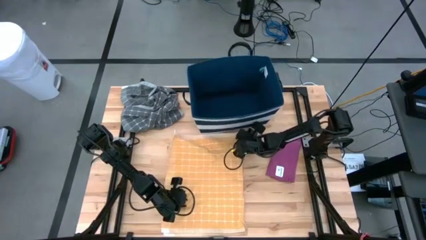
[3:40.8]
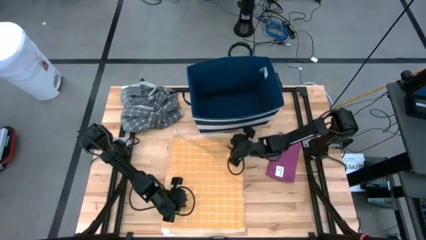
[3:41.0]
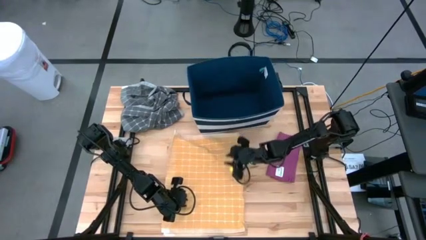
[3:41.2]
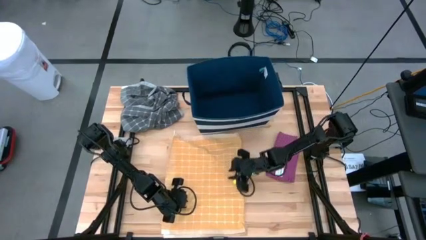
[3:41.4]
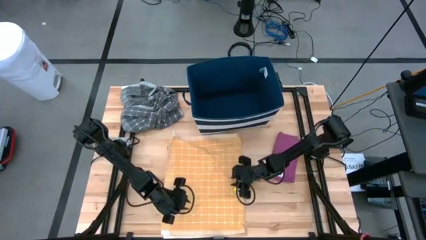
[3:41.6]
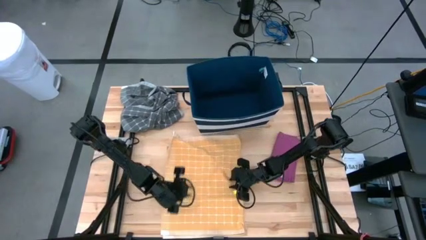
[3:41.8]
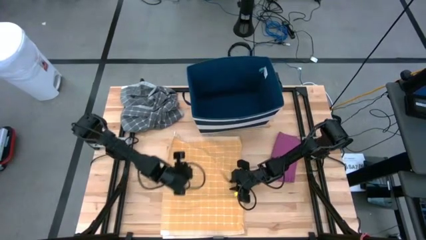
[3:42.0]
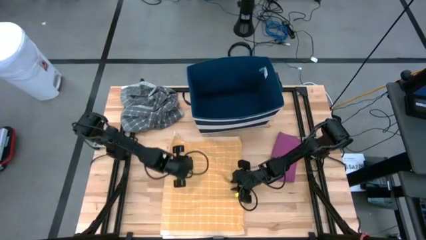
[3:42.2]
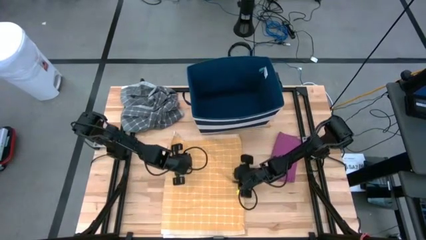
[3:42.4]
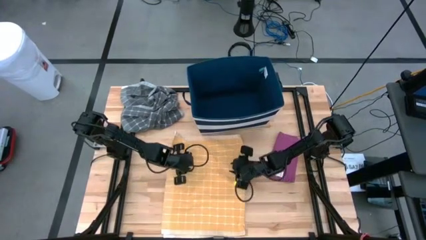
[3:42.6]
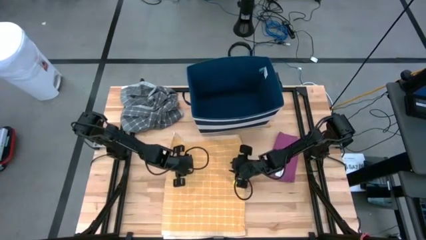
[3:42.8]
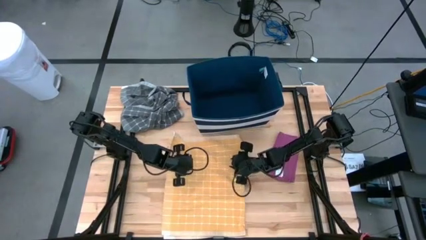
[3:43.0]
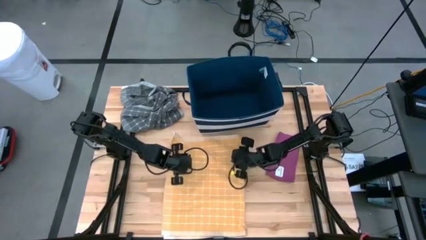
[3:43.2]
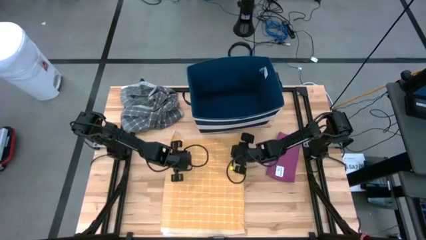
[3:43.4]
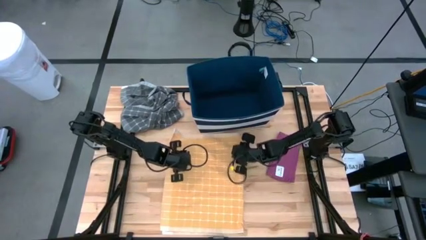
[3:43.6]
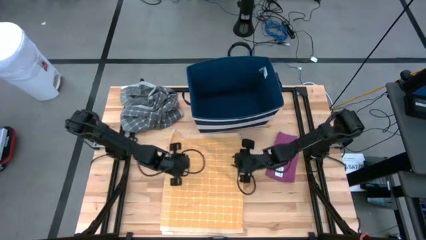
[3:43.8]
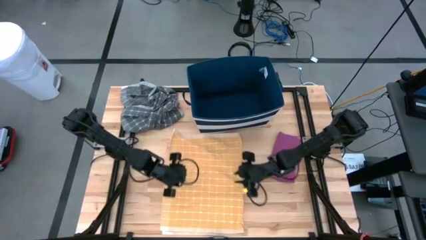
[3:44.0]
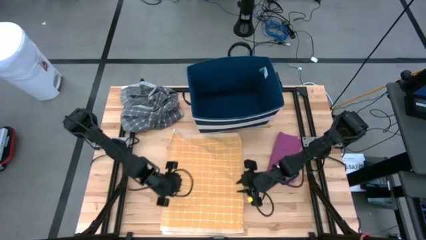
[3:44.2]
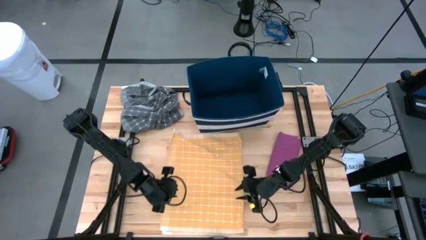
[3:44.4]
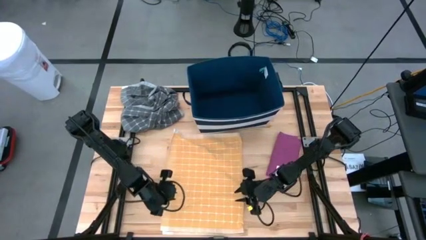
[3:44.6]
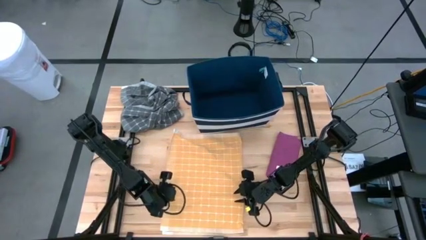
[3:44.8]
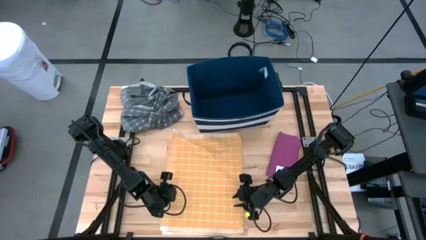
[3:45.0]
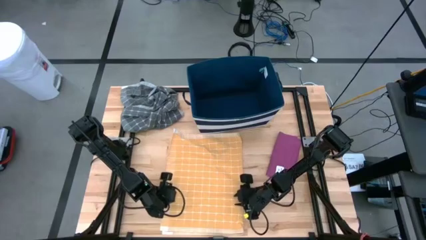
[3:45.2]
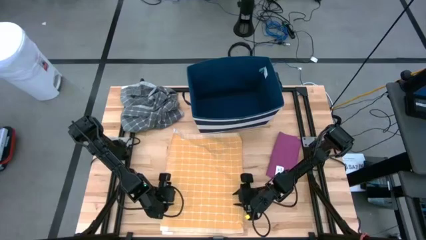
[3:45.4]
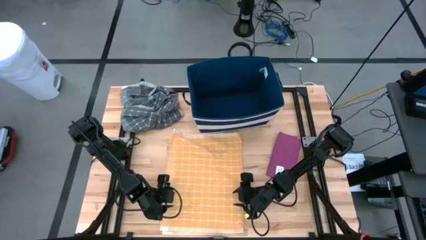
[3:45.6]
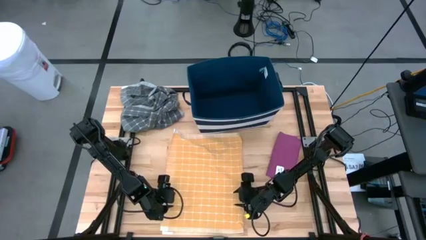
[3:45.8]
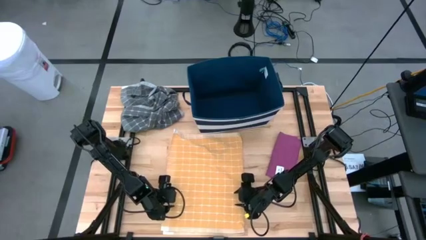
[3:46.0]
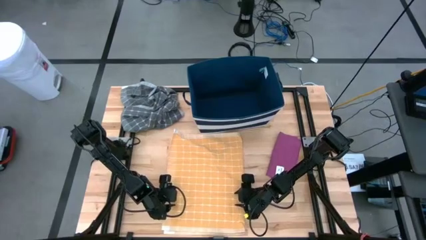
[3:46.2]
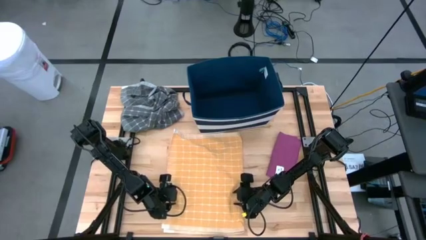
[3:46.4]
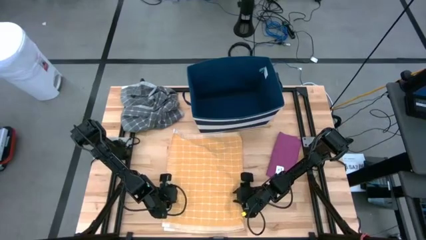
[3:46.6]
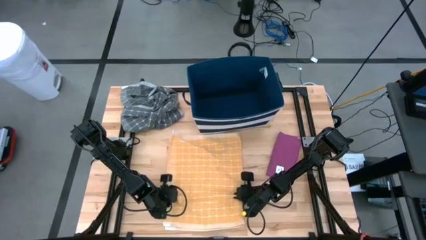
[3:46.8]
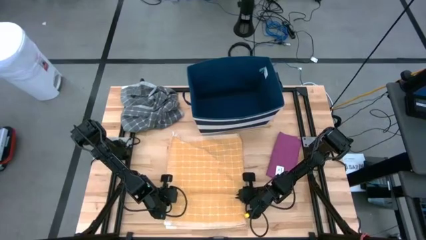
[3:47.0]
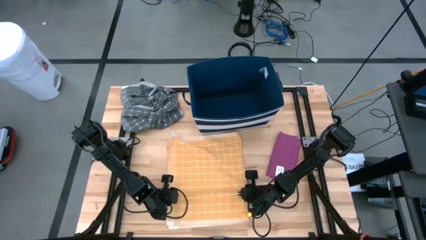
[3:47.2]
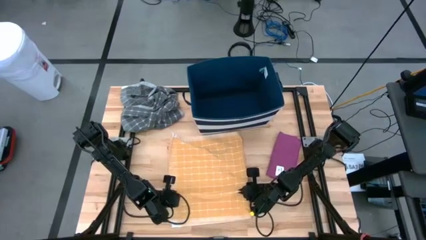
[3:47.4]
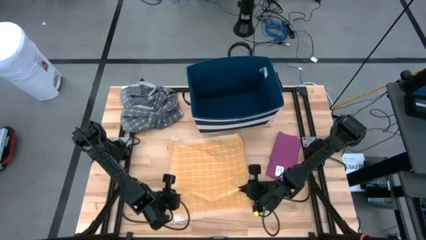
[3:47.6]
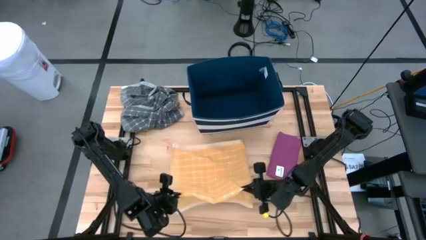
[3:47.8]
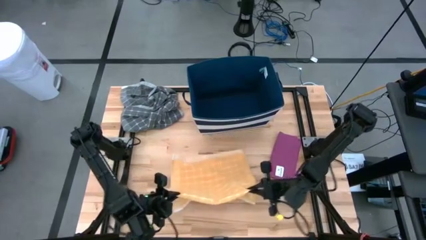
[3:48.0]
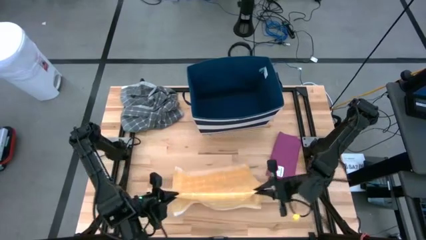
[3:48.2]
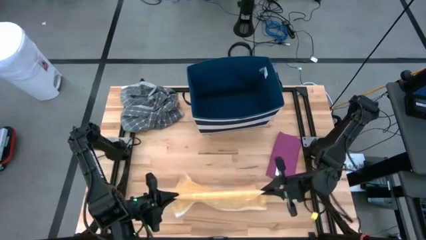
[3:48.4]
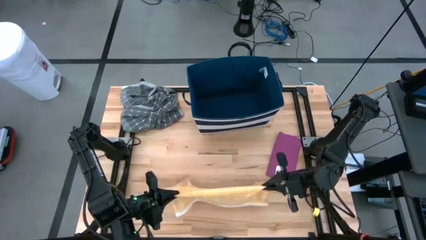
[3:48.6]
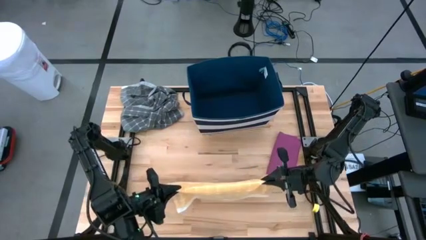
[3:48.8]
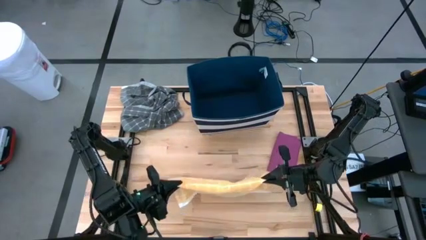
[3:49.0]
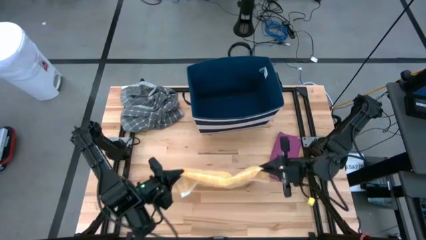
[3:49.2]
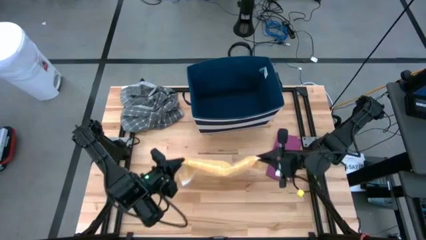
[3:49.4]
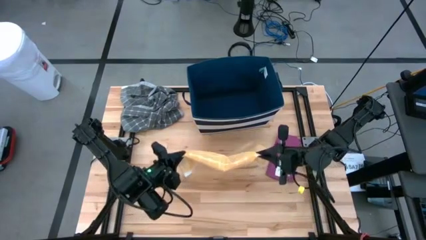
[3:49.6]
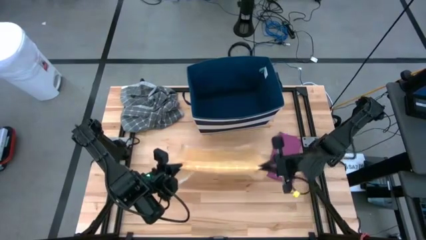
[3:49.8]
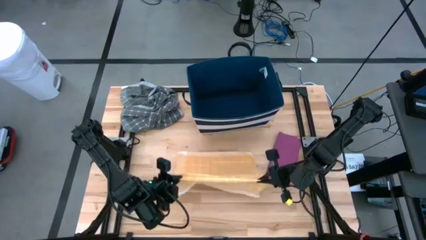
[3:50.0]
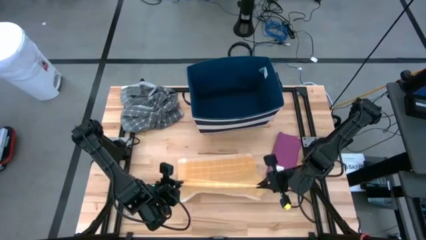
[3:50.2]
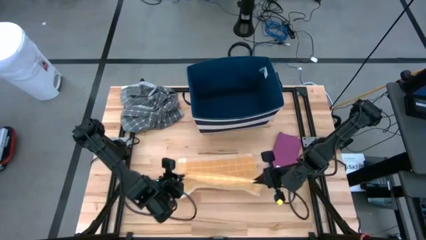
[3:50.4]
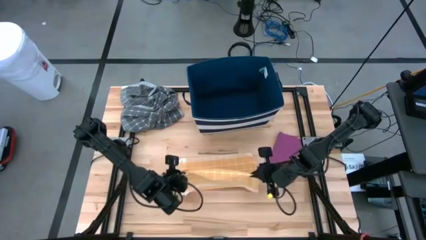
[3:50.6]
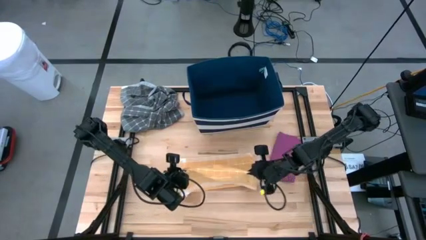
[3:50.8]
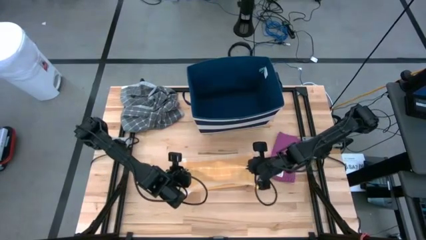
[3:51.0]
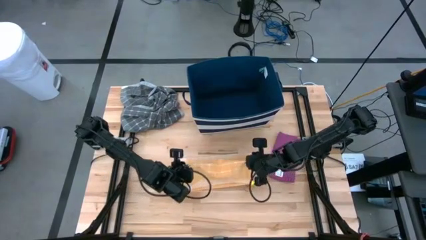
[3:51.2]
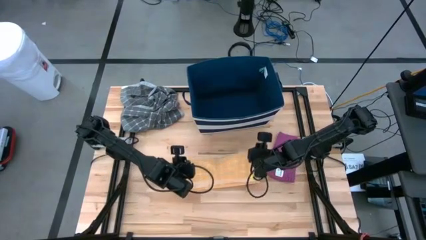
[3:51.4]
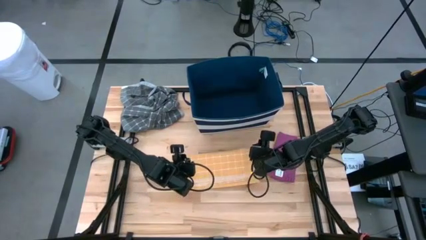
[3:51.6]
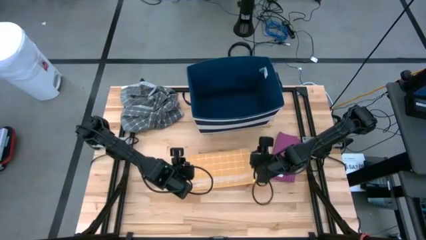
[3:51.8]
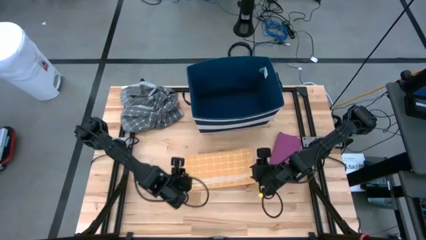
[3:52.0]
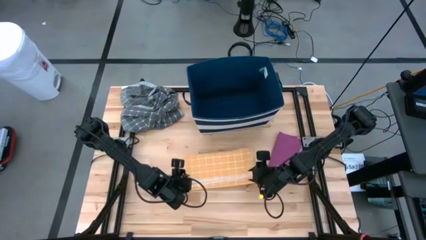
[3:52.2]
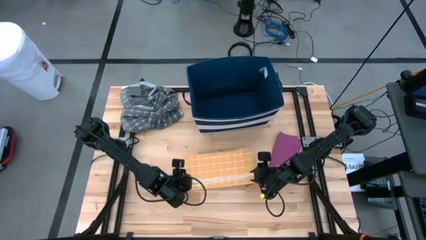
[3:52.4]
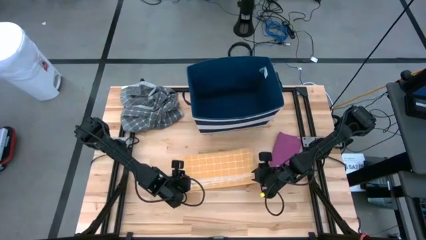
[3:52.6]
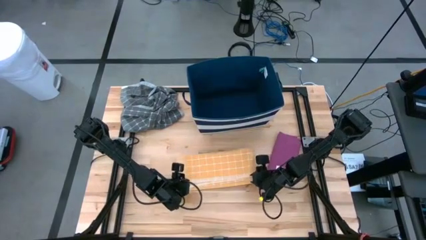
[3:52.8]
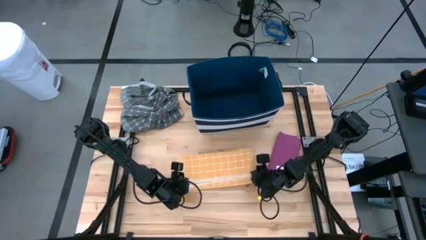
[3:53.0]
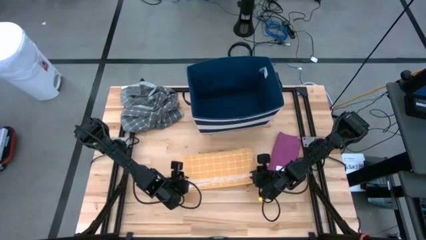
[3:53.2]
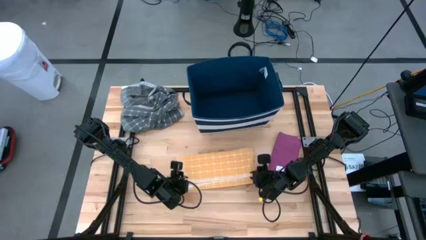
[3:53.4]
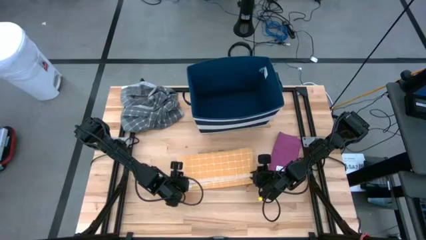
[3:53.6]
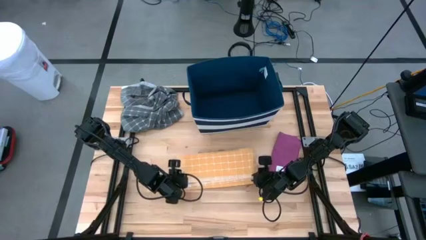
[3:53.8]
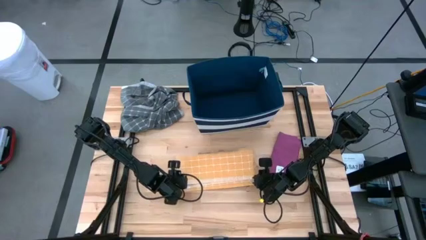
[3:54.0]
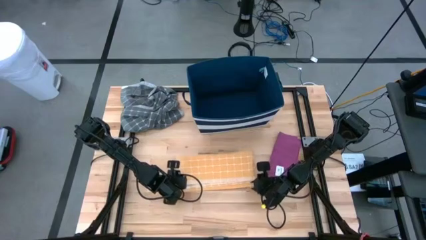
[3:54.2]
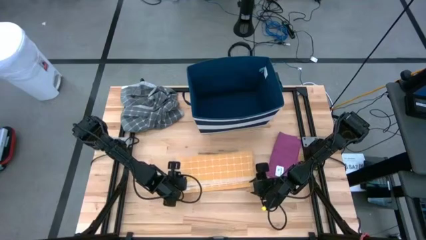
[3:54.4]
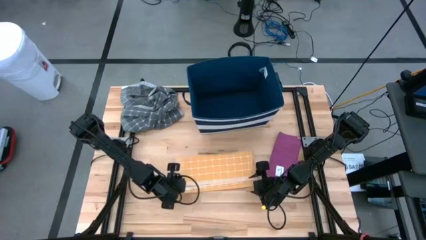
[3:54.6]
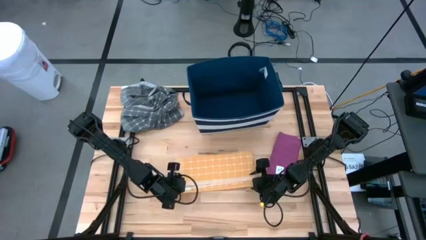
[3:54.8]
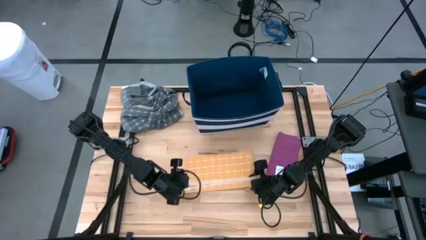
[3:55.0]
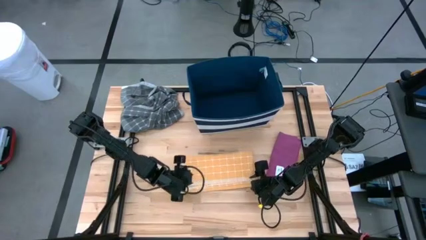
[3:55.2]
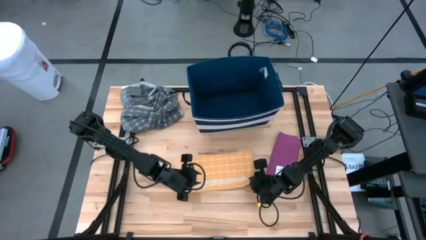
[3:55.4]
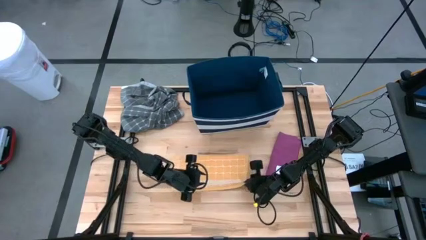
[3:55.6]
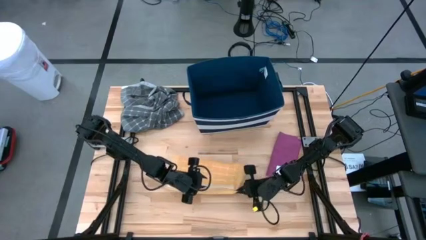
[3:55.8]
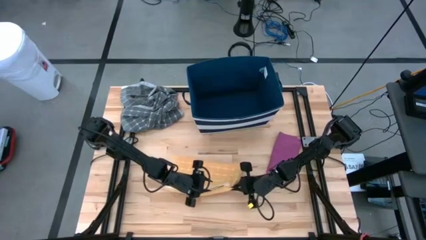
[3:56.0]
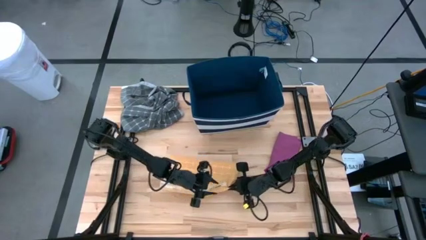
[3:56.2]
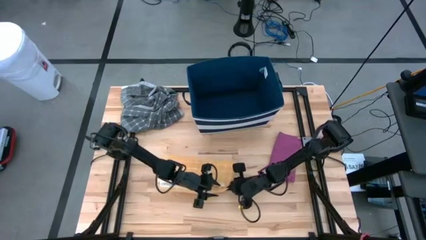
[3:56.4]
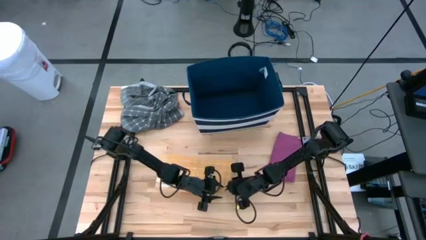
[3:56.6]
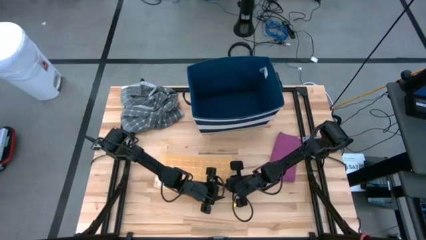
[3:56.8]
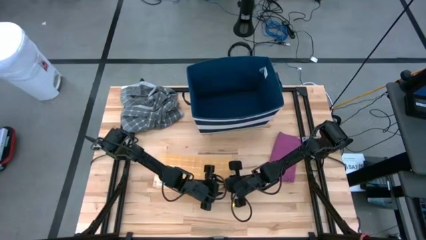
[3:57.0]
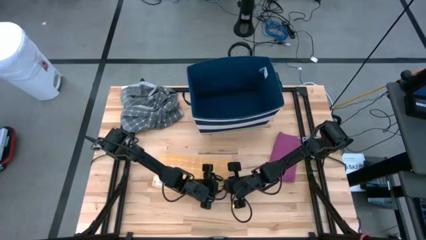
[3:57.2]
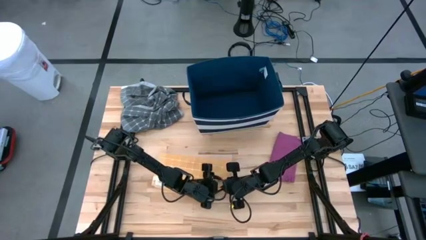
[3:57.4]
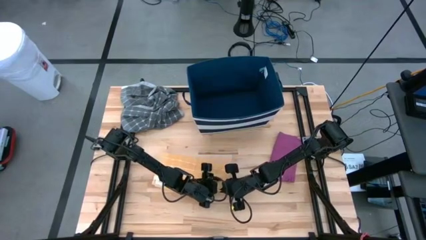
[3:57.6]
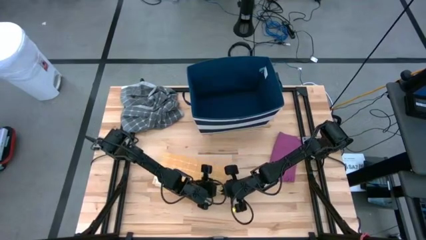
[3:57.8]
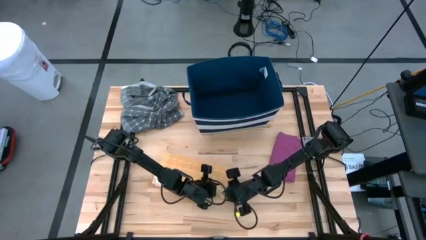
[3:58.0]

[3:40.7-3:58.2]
Task: Fold towel
Fold the yellow towel
